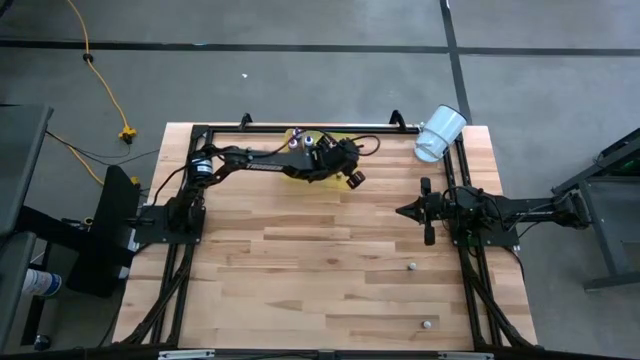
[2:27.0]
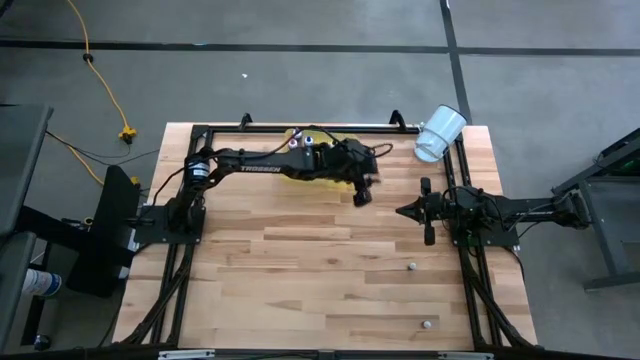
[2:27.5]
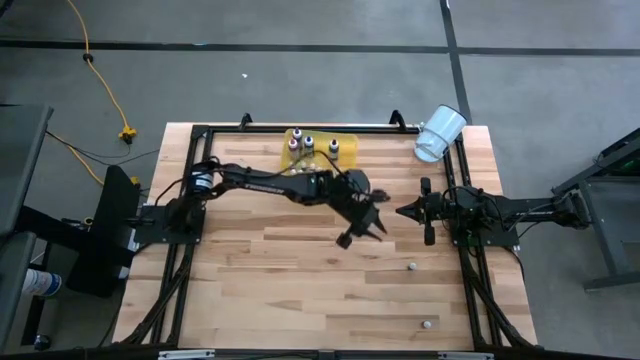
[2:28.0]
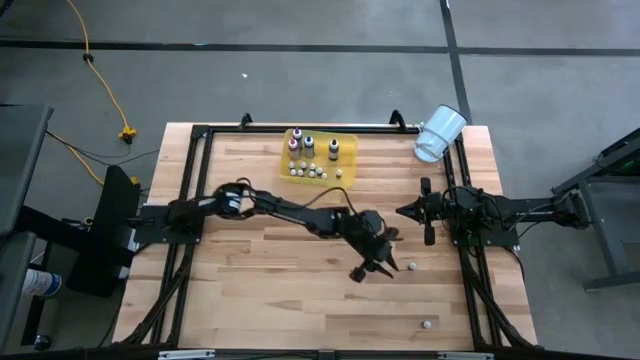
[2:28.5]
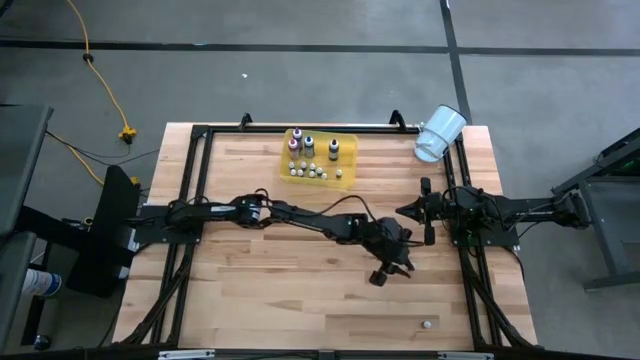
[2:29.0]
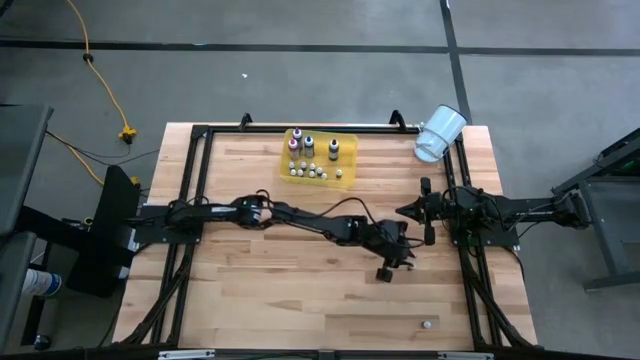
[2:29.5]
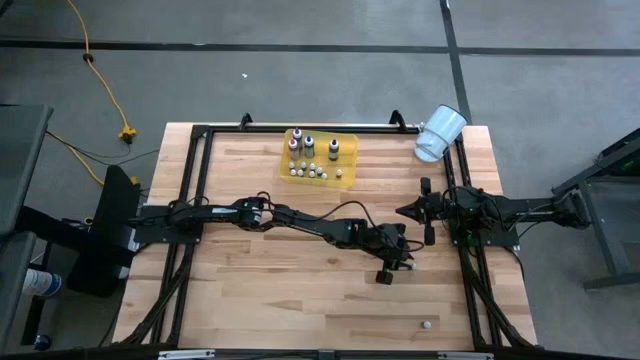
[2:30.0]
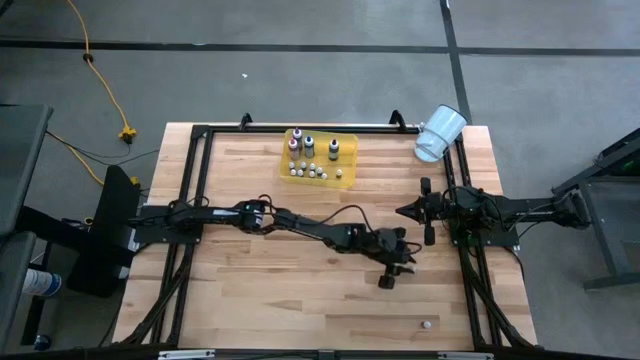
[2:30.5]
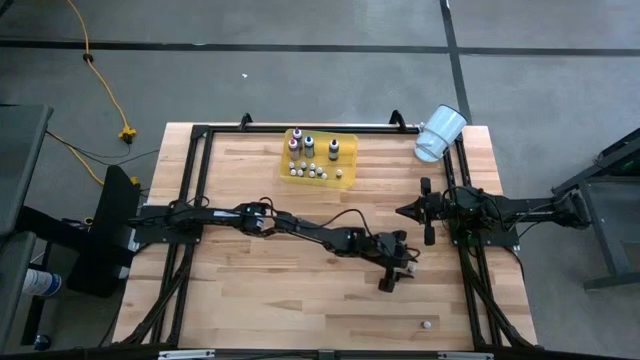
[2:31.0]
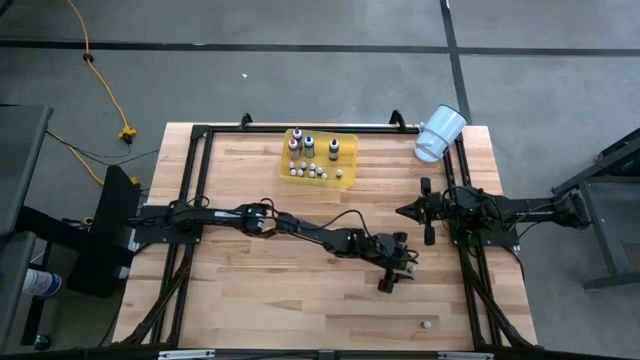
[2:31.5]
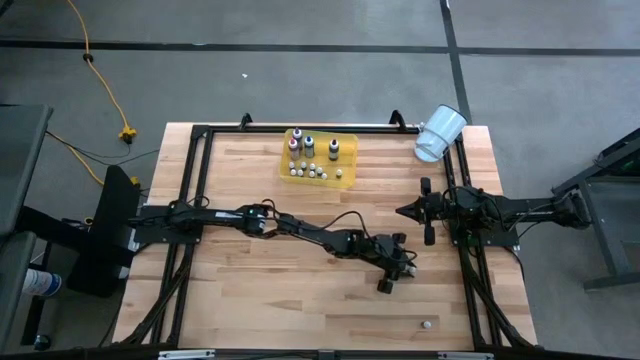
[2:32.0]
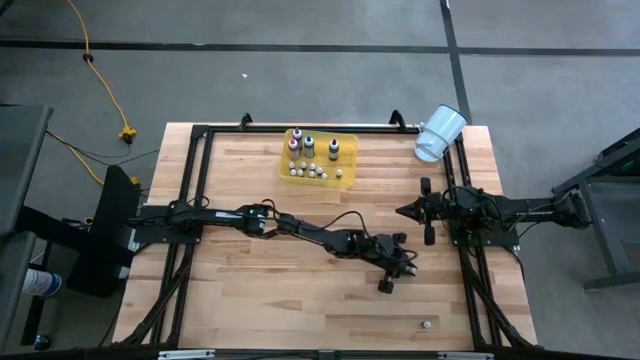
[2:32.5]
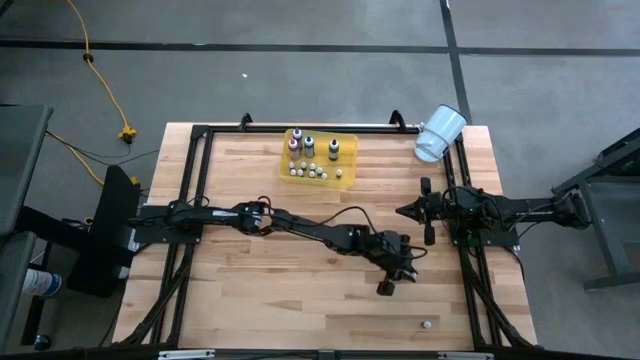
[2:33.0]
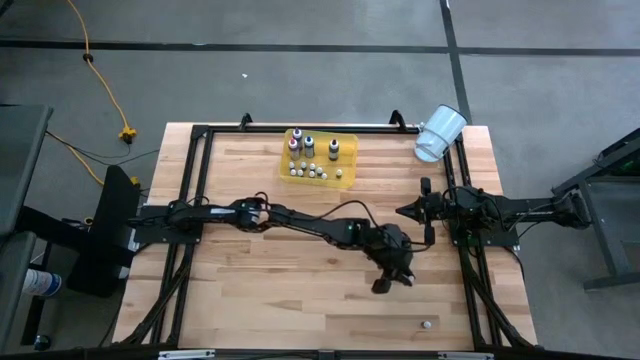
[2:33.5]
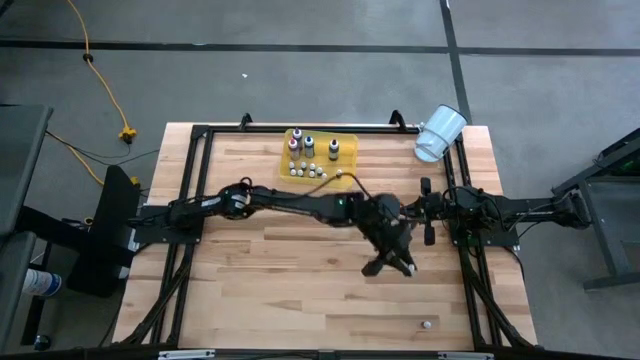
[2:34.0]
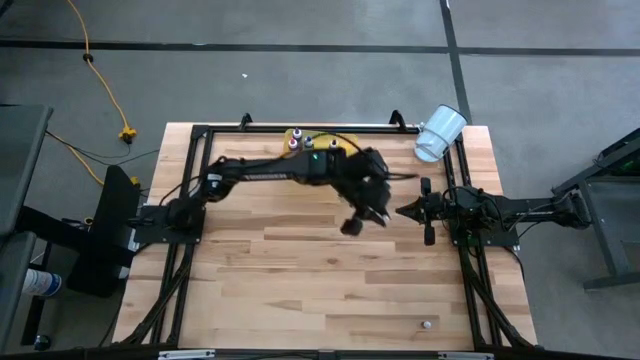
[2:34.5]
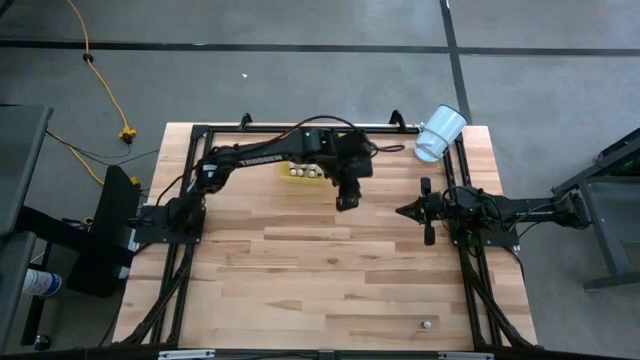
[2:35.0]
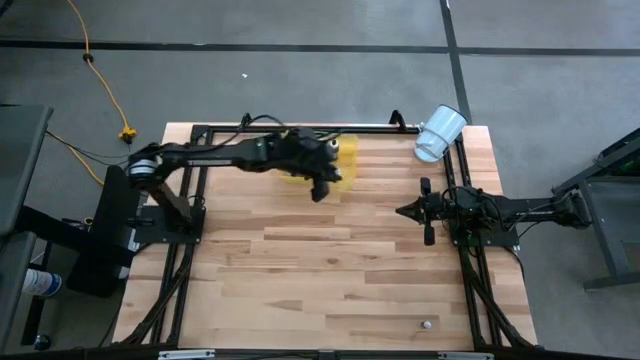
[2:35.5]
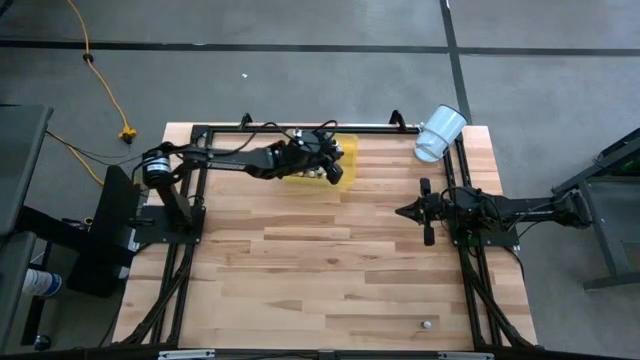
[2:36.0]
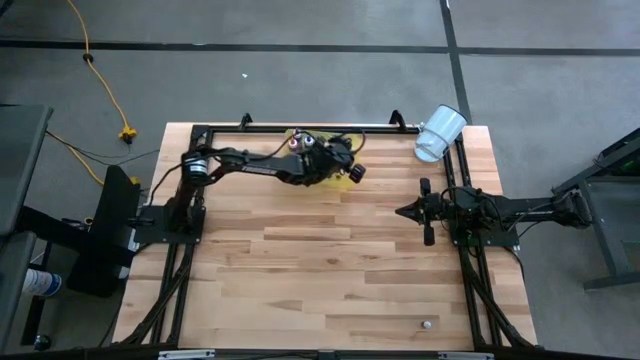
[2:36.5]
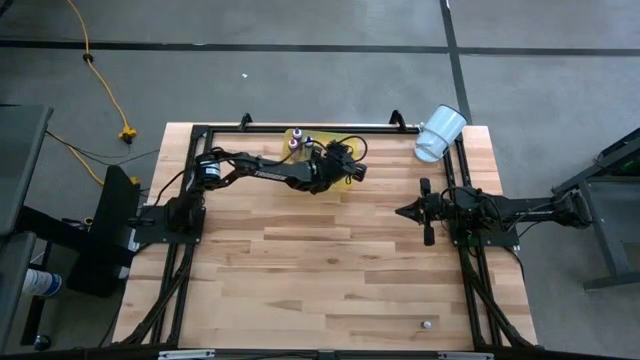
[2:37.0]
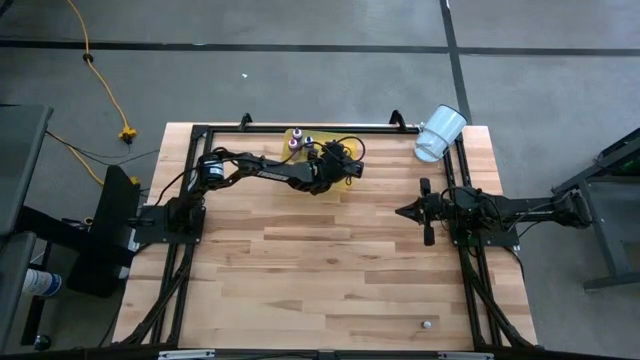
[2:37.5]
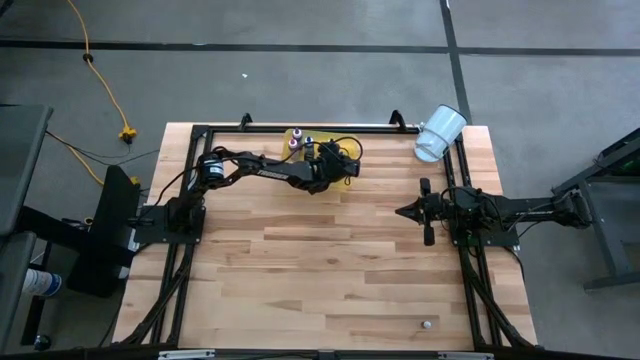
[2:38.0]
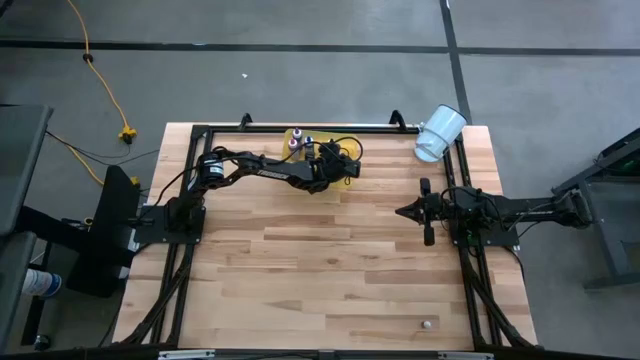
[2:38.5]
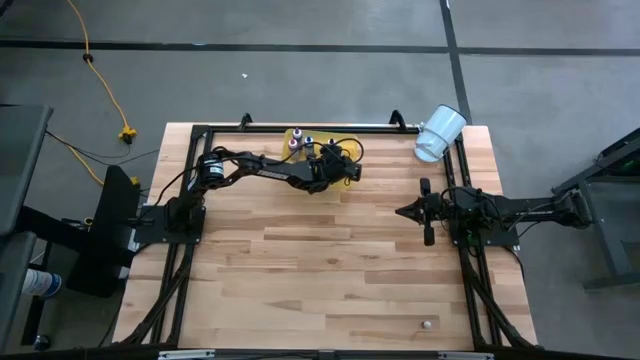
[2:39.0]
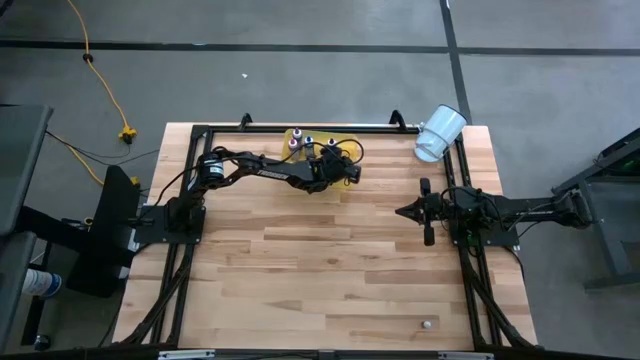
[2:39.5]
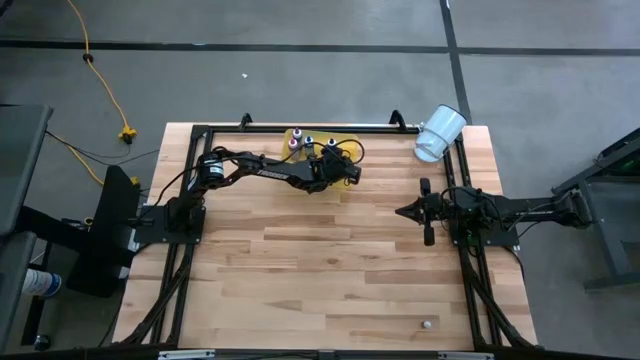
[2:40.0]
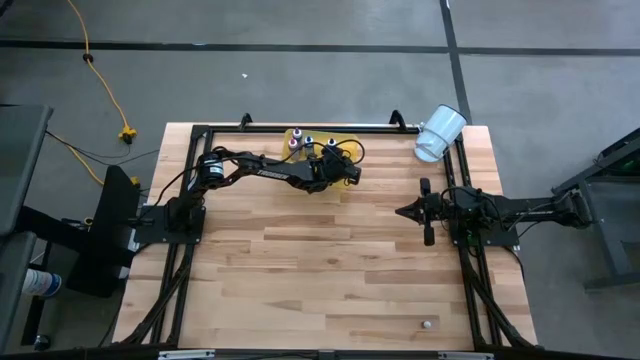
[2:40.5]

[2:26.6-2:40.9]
Task: Pick & Place food coloring
Put the small green food coloring into the yellow container

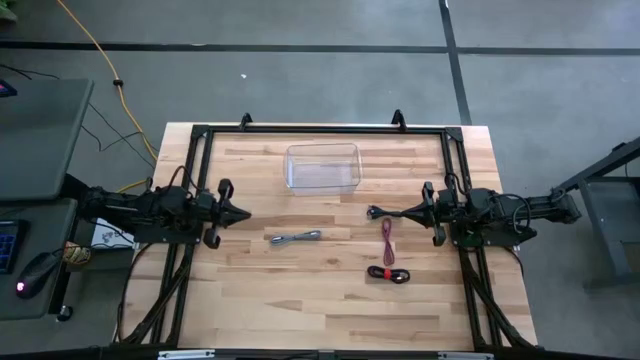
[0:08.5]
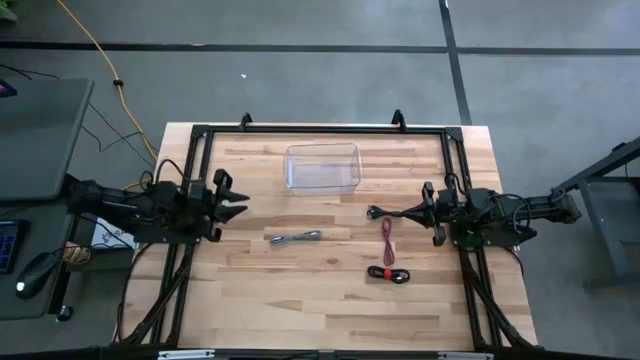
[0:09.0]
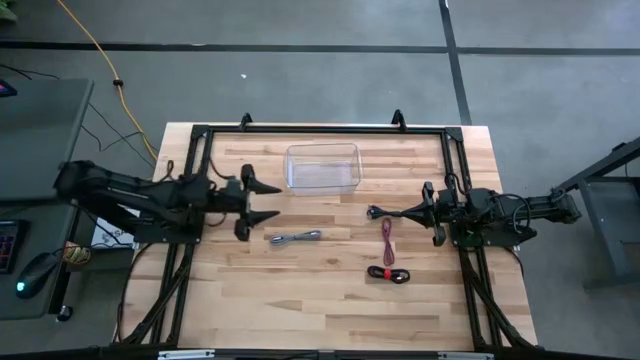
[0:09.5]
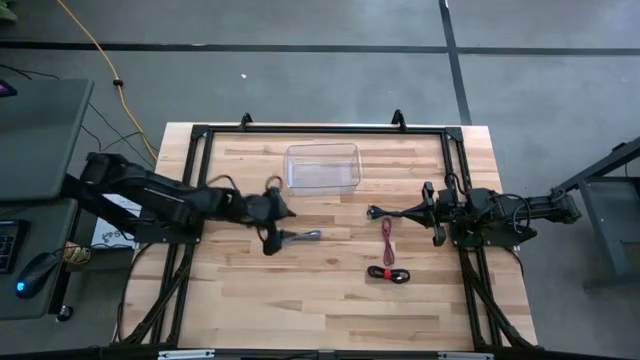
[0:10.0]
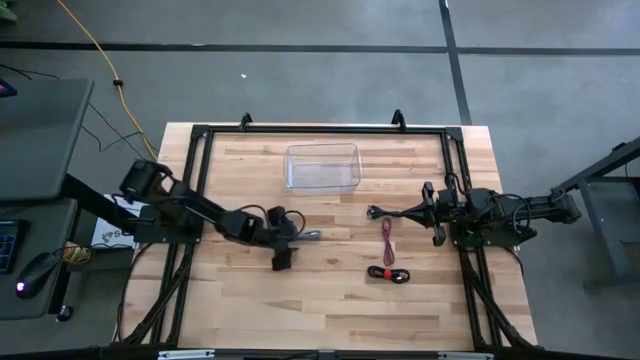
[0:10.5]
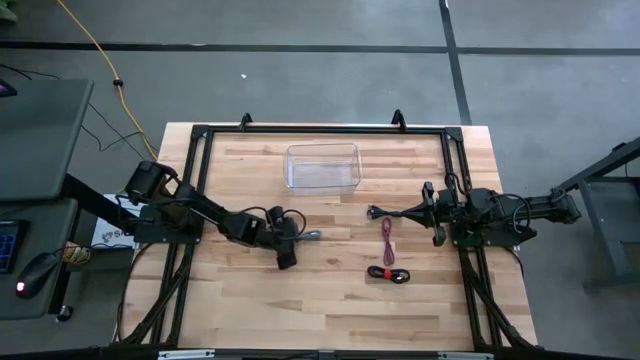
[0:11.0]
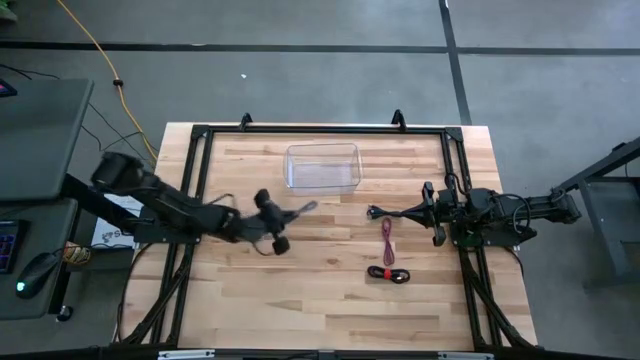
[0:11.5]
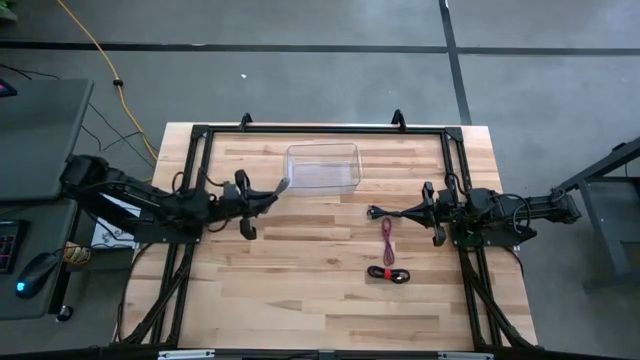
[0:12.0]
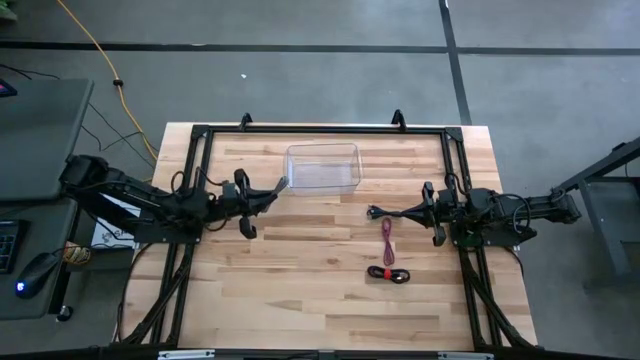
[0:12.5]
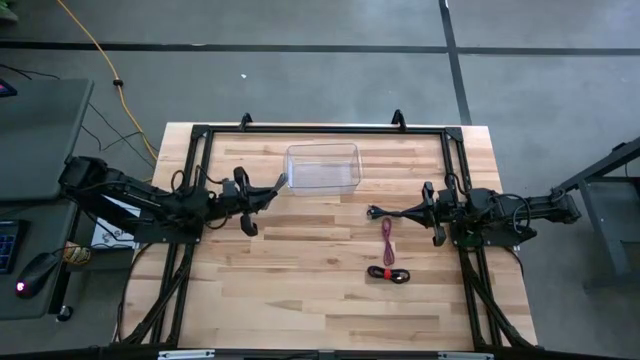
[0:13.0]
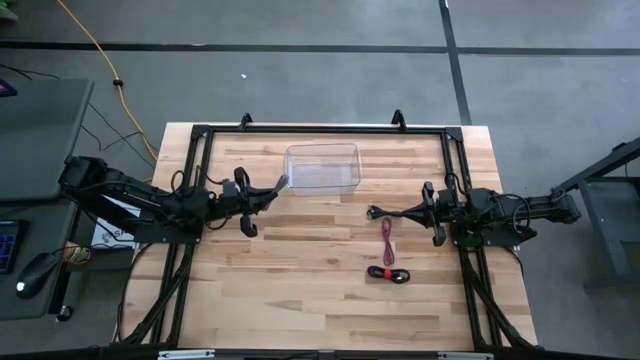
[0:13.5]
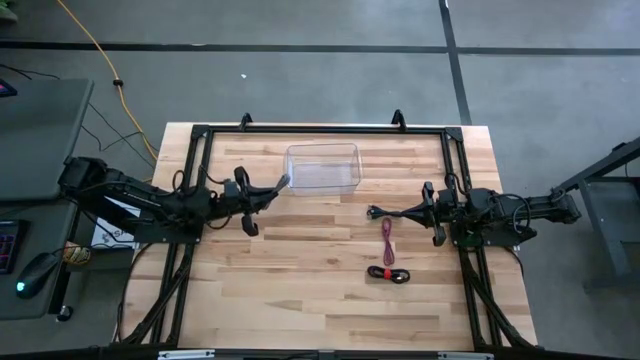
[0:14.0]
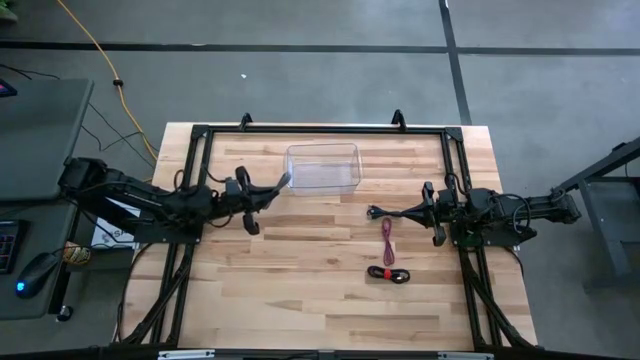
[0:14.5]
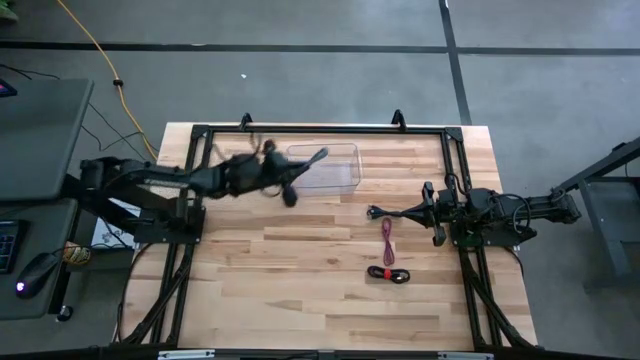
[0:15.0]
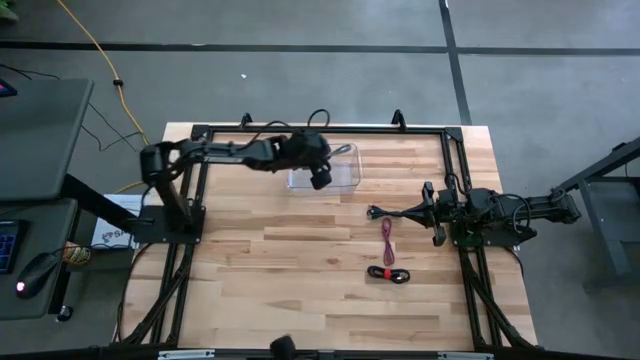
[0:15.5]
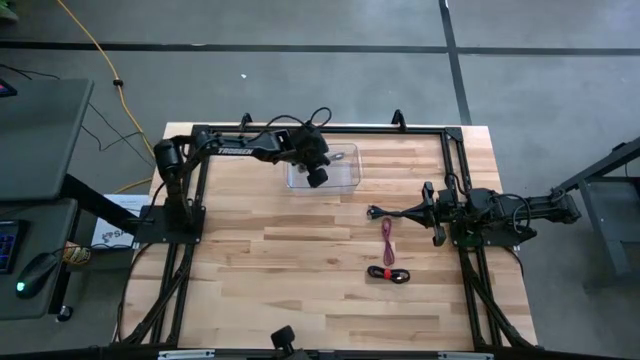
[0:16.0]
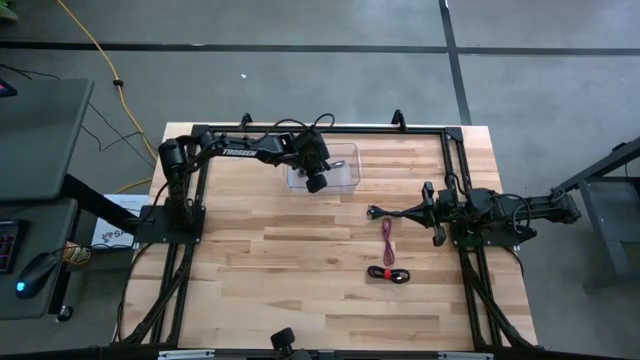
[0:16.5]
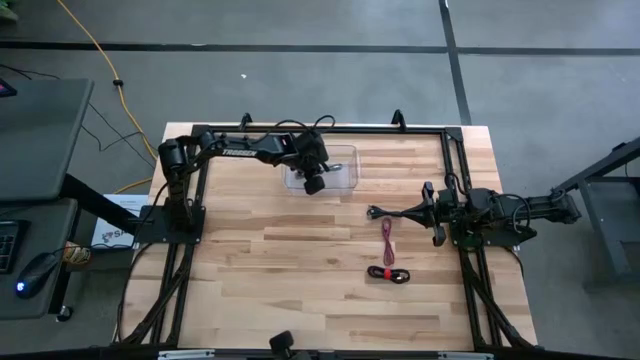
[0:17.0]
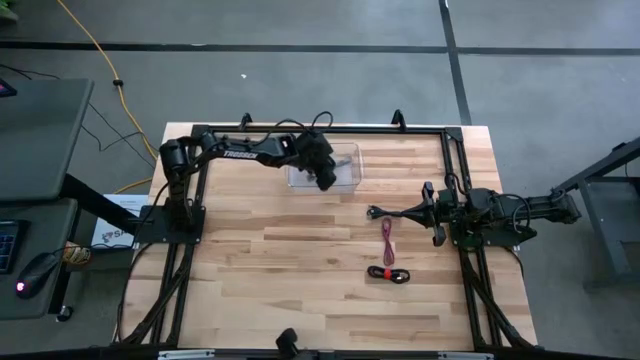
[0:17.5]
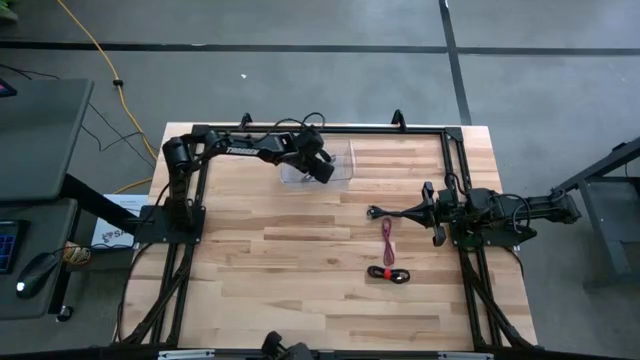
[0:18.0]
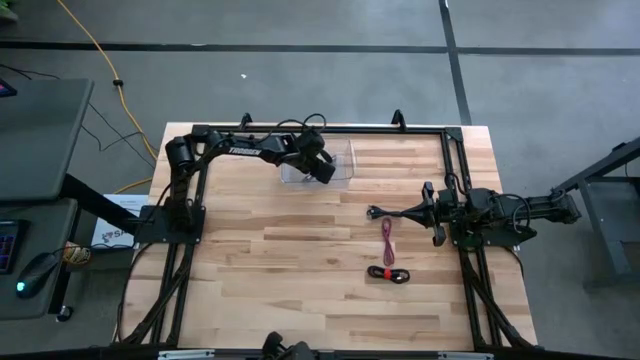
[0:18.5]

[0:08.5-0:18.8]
Task: Pick and place USB-C Cables
Put the black white charger cable into the transparent bin
